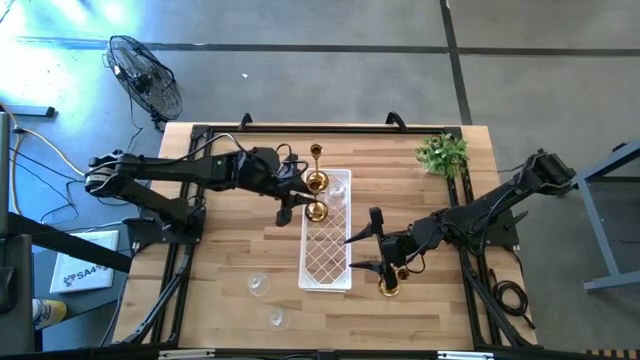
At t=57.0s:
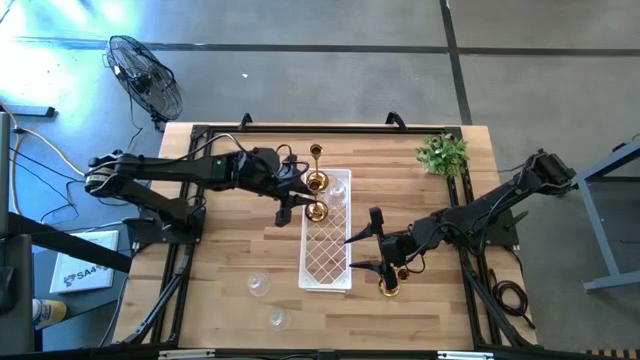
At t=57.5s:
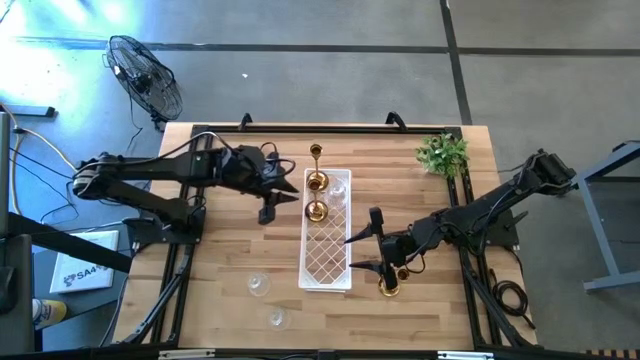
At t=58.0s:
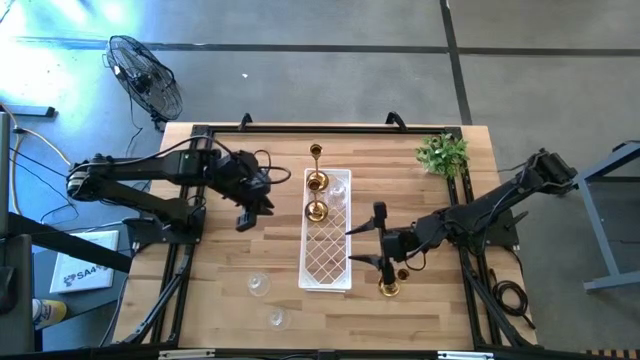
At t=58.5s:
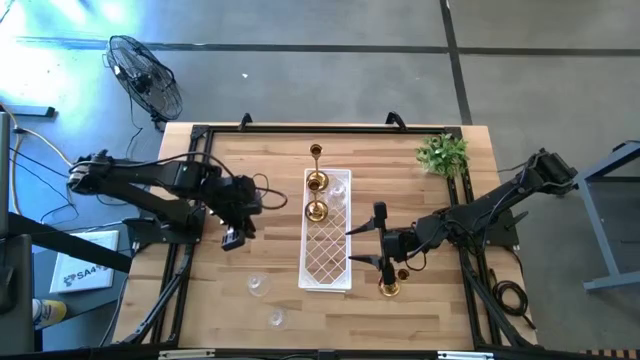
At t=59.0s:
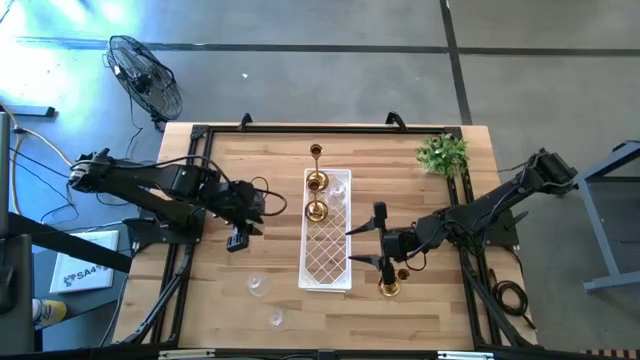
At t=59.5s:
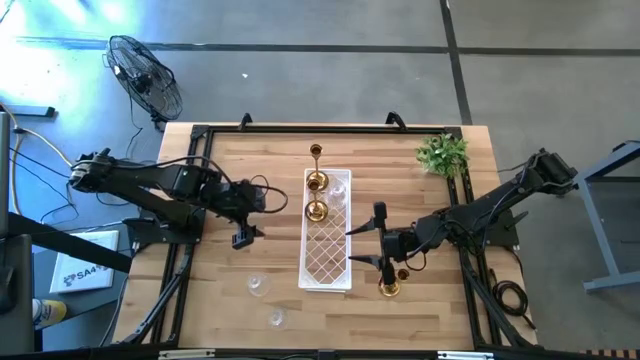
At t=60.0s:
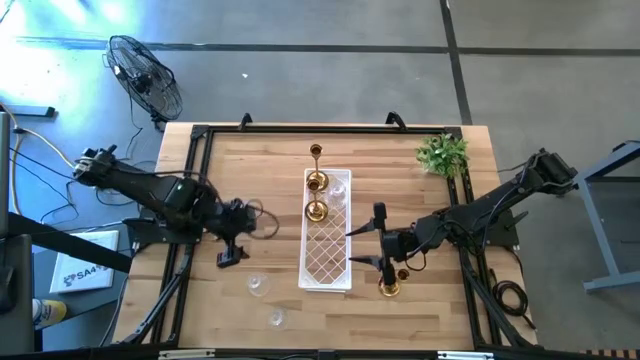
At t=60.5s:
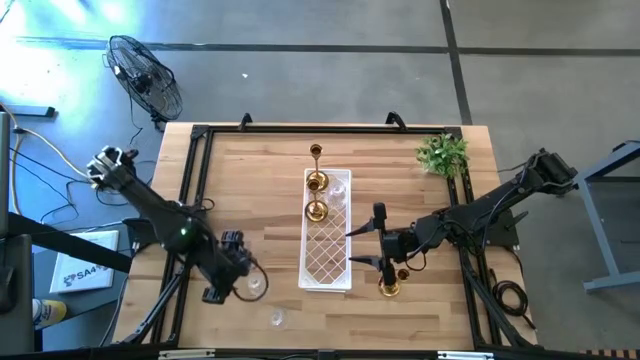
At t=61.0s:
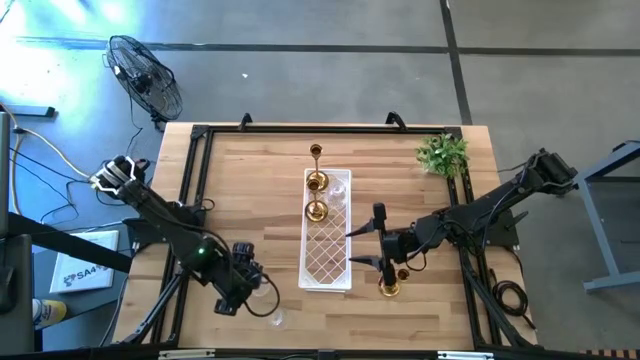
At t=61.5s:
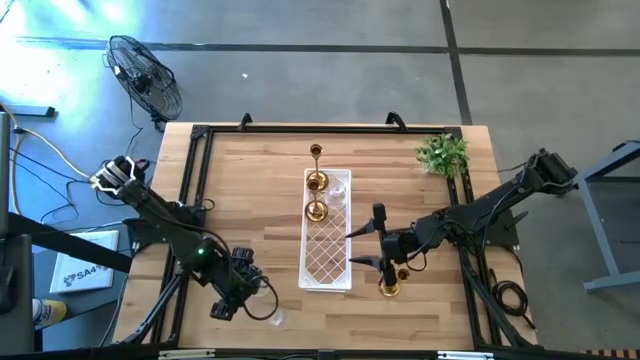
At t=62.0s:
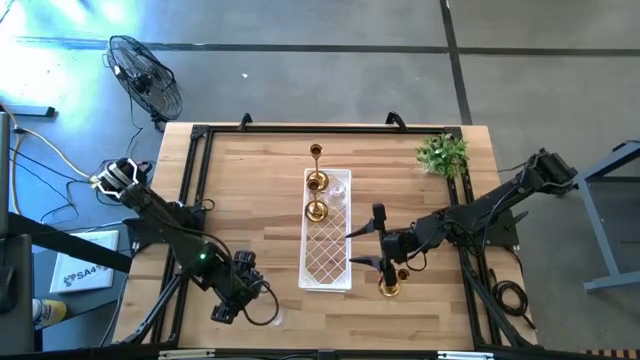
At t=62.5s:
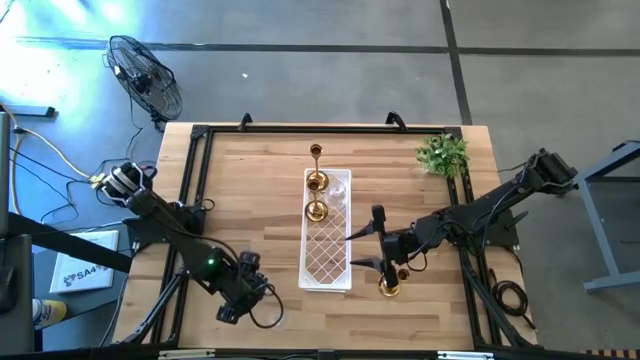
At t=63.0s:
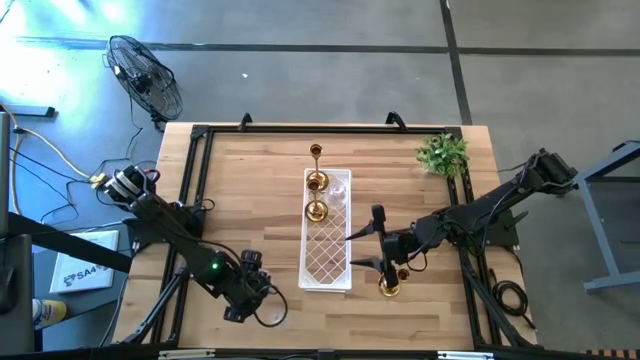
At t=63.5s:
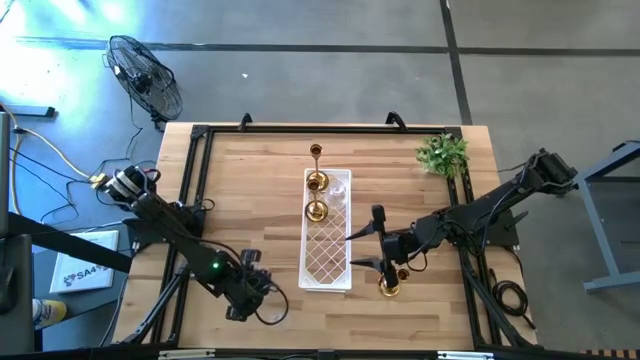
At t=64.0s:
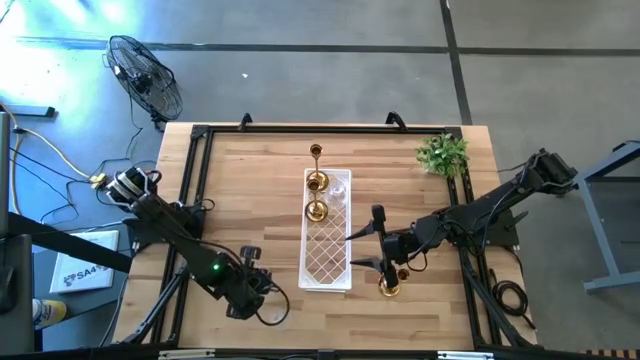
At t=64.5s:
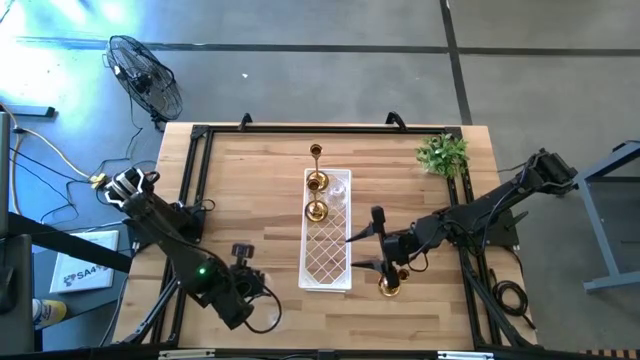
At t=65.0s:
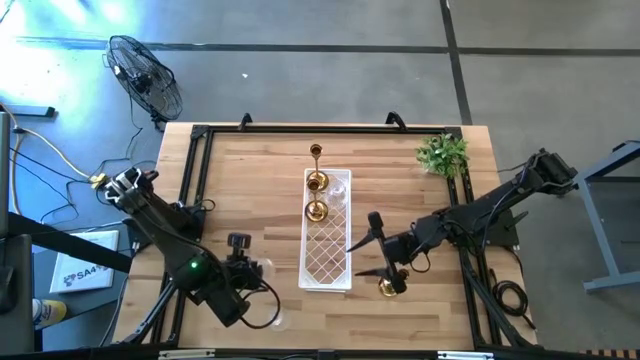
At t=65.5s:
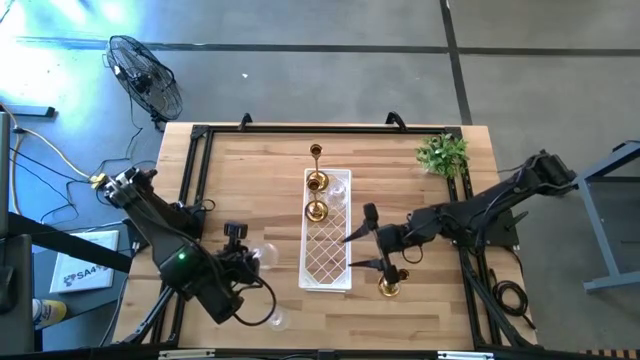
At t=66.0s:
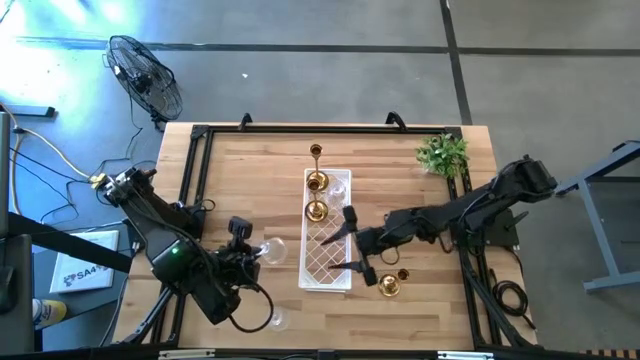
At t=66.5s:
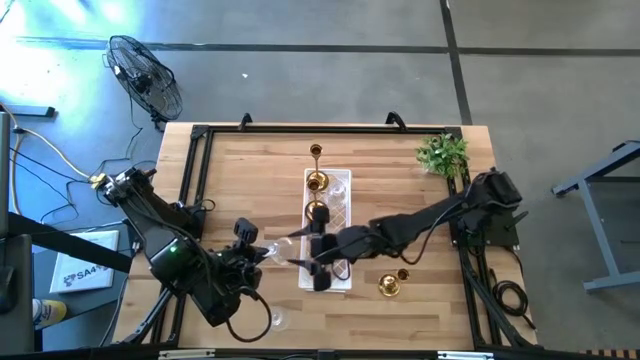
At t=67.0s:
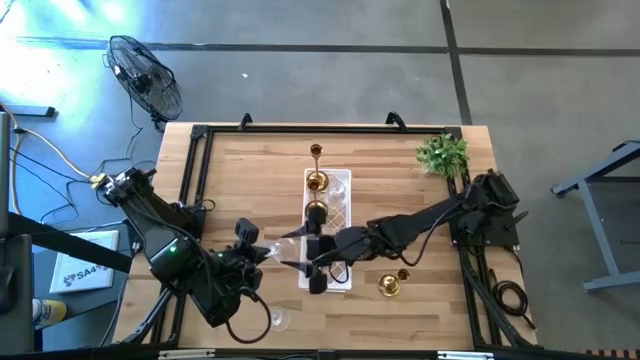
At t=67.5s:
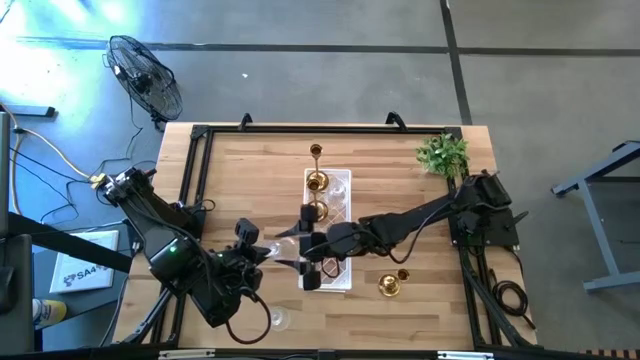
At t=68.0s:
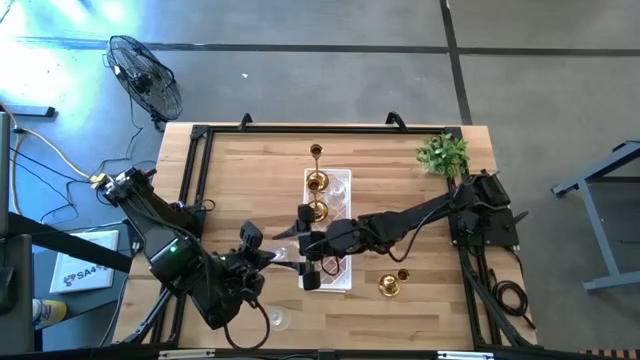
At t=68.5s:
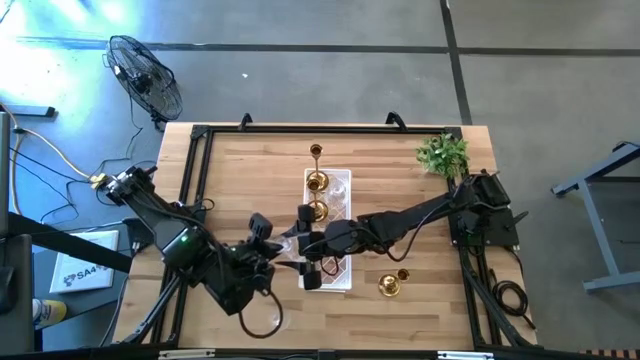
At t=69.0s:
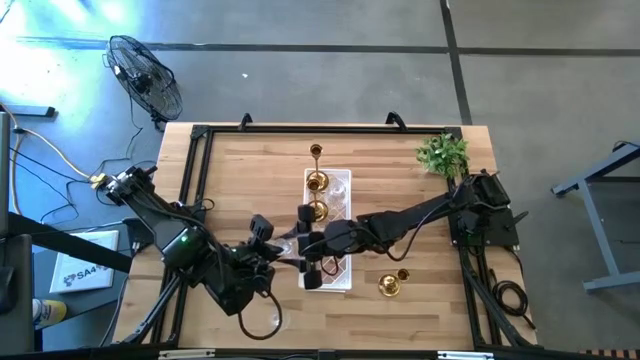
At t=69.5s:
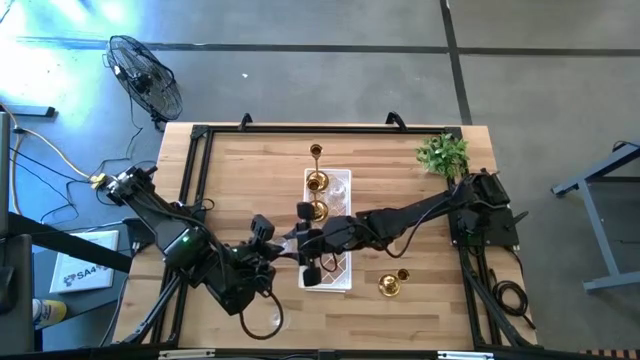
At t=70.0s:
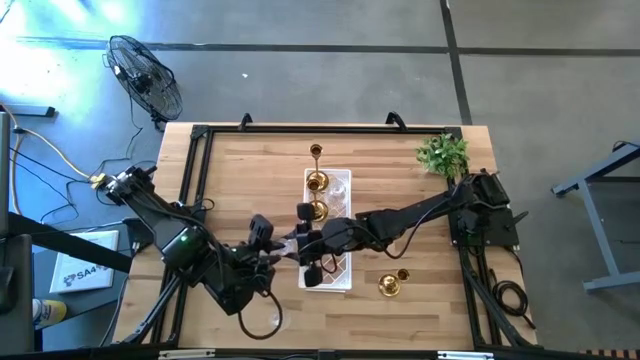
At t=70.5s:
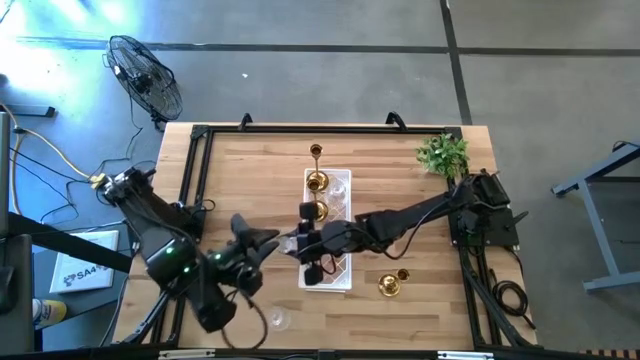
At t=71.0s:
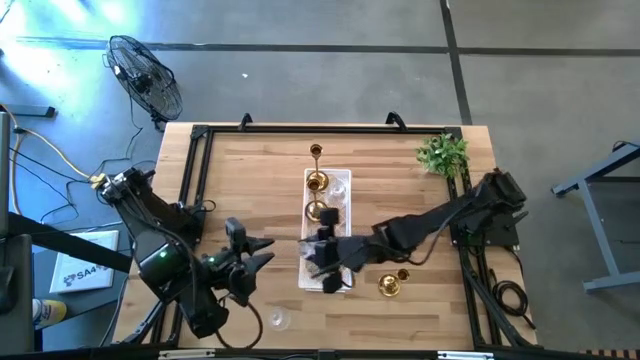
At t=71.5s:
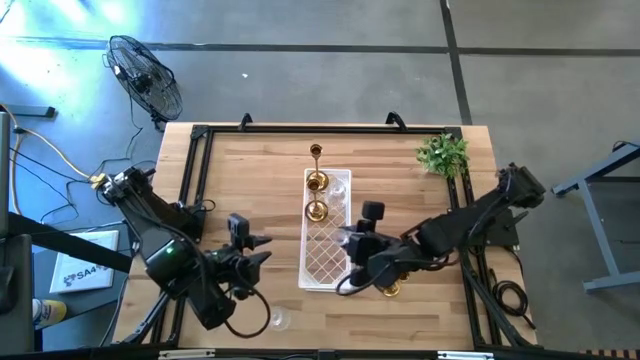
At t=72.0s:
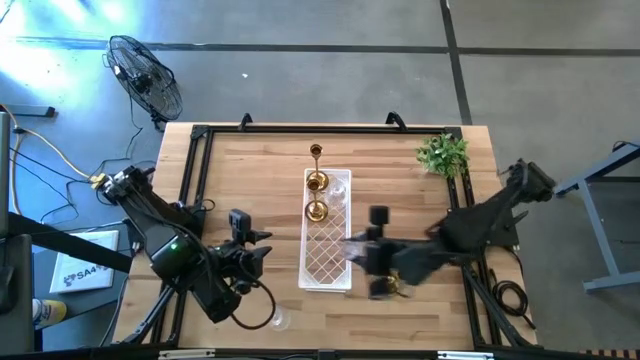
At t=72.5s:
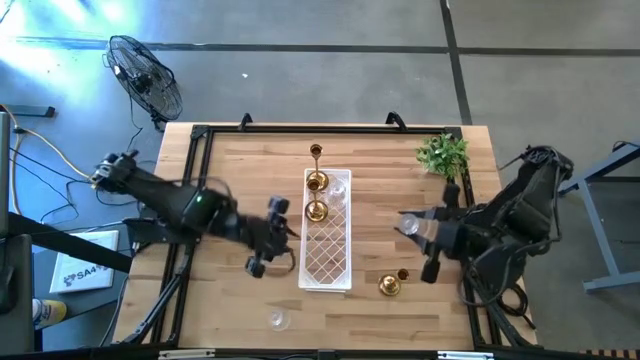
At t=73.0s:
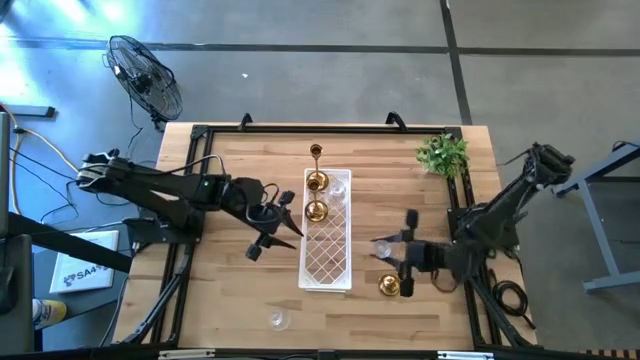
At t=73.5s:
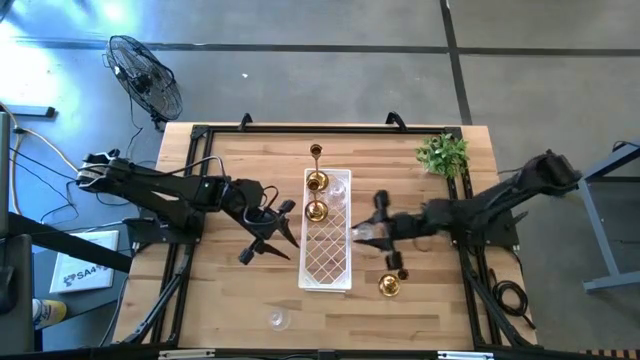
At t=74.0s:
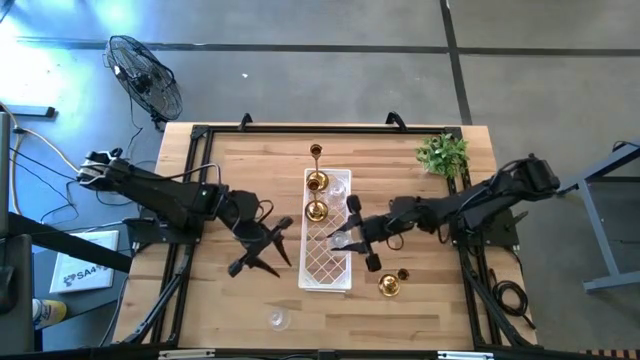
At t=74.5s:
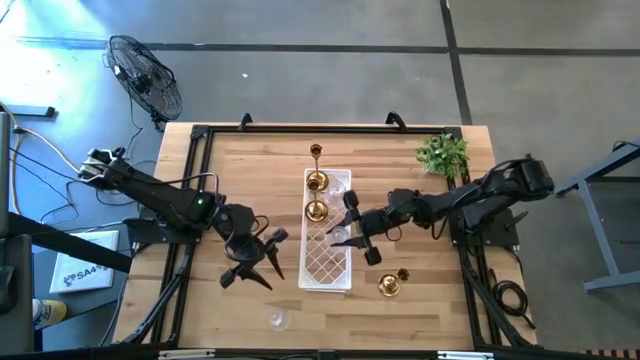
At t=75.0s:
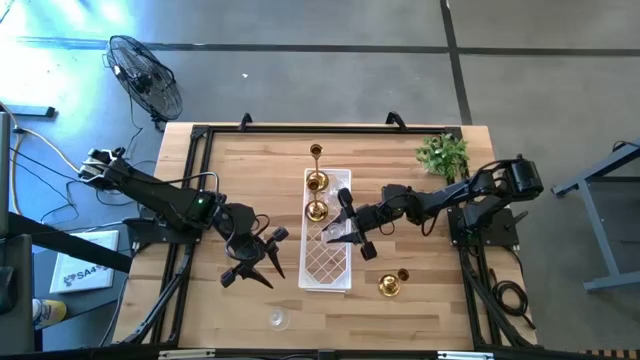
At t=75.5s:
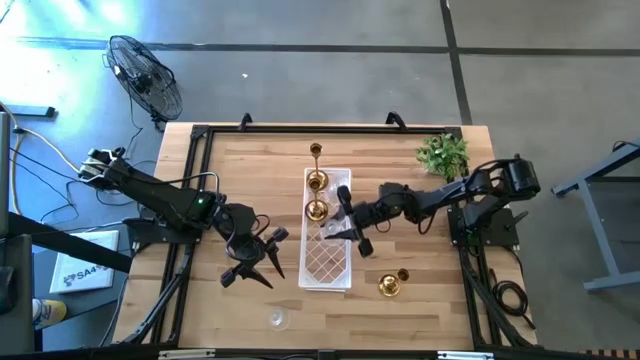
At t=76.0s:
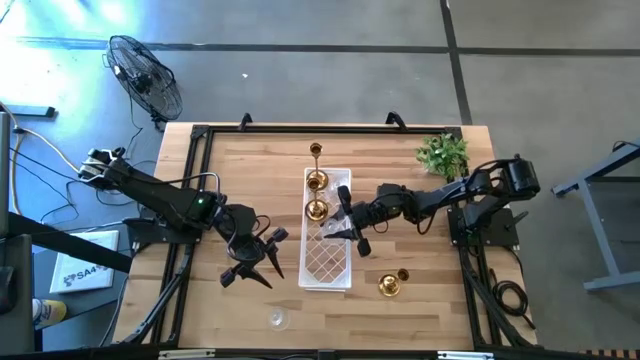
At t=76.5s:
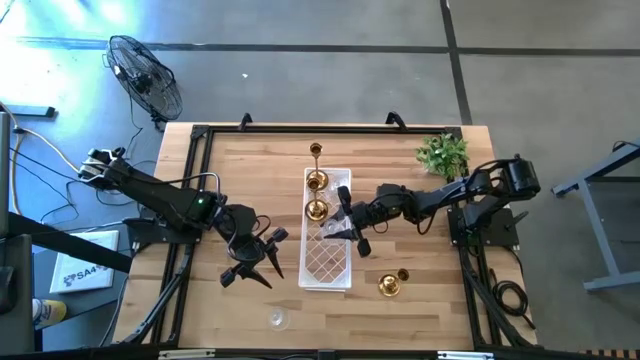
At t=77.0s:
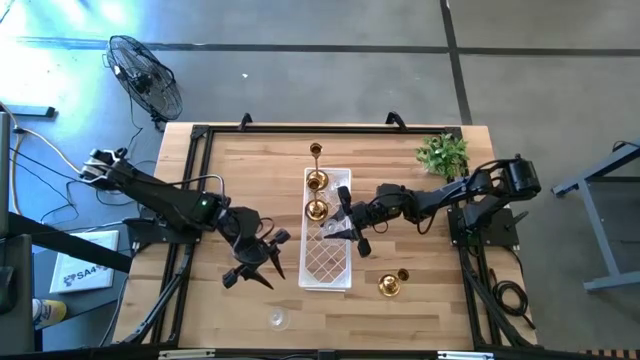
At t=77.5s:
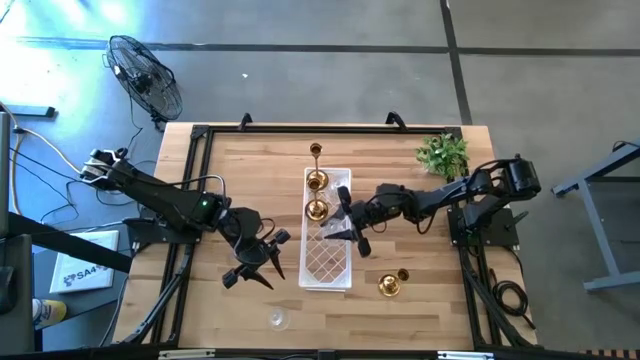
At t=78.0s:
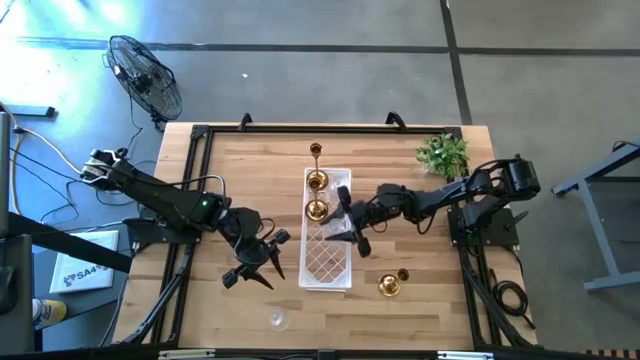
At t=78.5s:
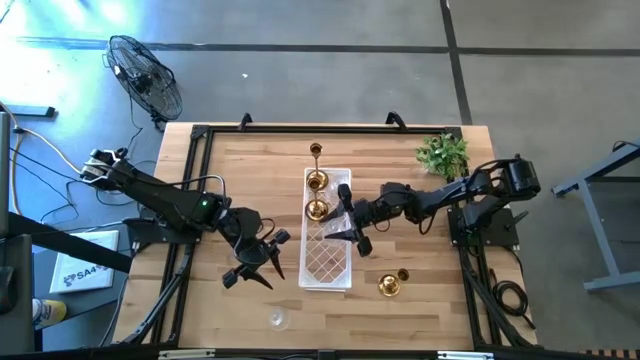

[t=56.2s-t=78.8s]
Task: Pick & Place candle stick holders
Put the top transparent candle holder on the shelf aligned with the other transparent candle holder
